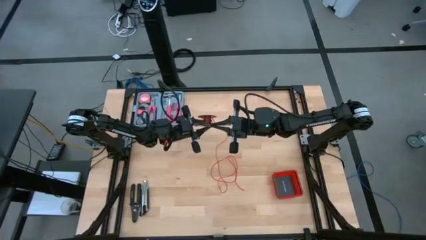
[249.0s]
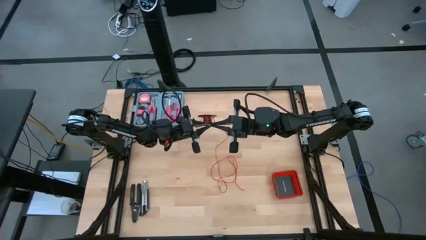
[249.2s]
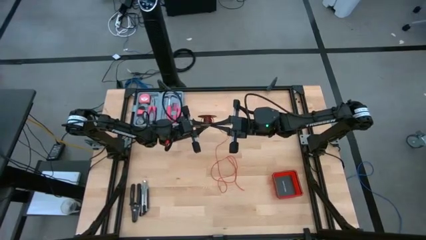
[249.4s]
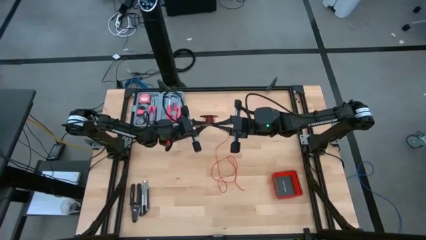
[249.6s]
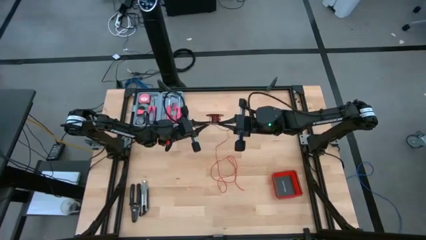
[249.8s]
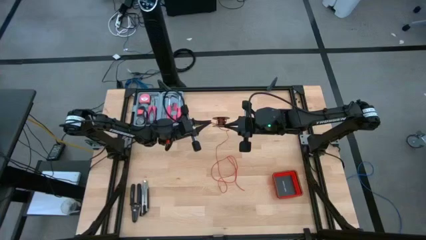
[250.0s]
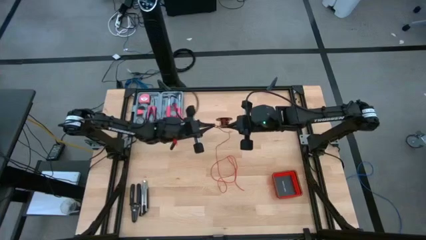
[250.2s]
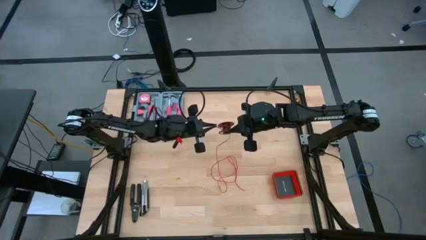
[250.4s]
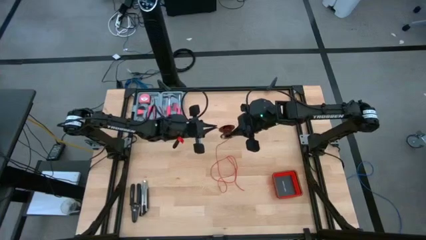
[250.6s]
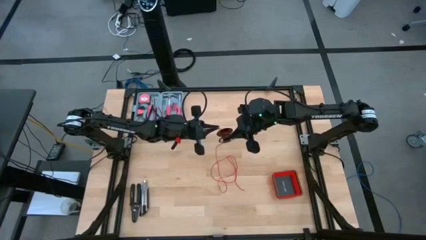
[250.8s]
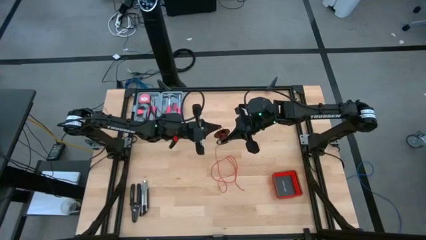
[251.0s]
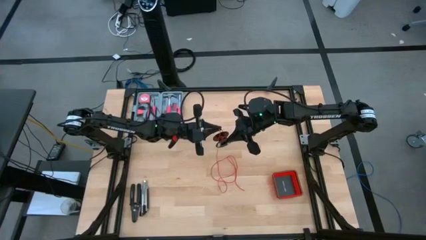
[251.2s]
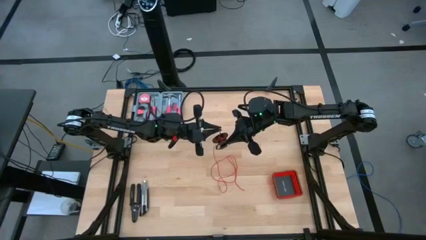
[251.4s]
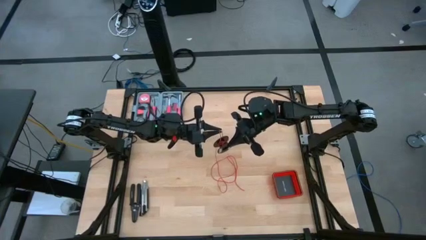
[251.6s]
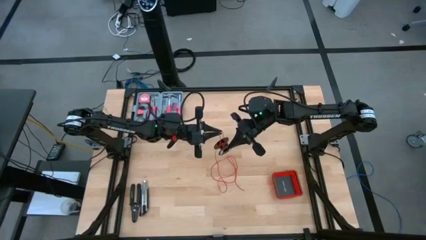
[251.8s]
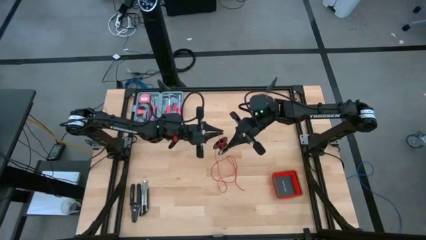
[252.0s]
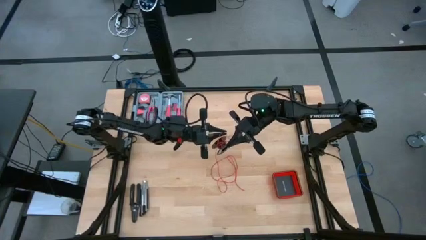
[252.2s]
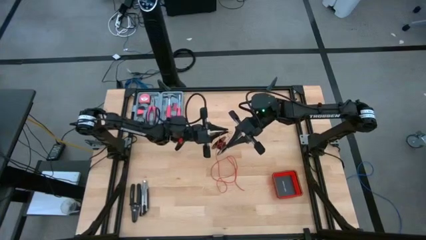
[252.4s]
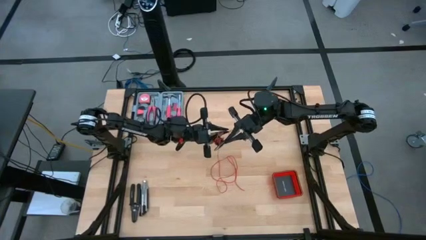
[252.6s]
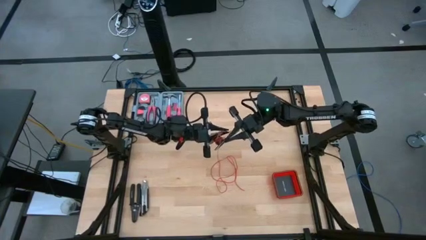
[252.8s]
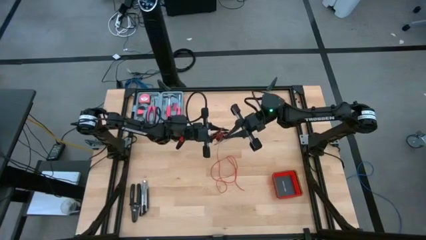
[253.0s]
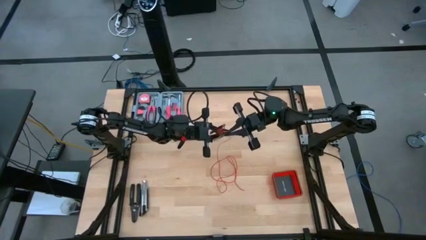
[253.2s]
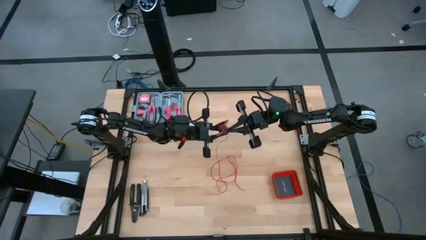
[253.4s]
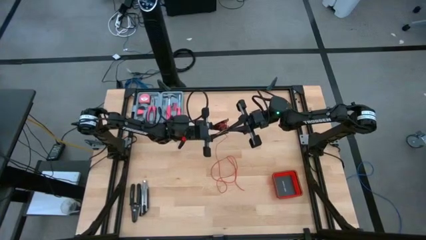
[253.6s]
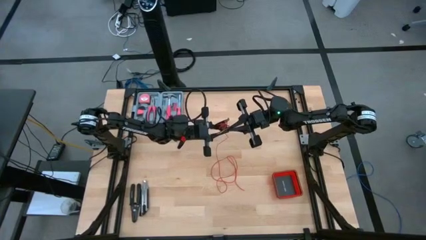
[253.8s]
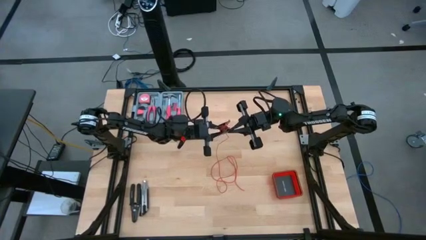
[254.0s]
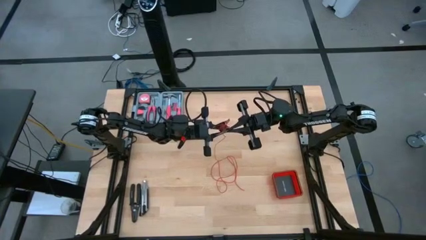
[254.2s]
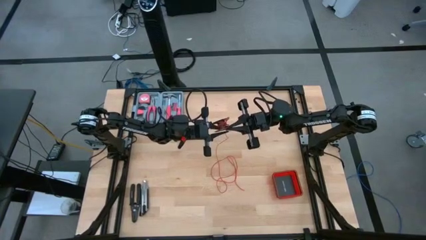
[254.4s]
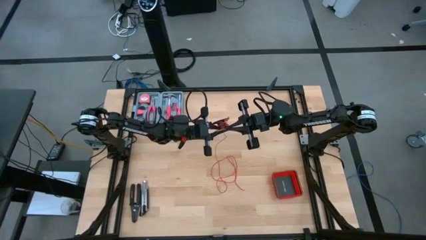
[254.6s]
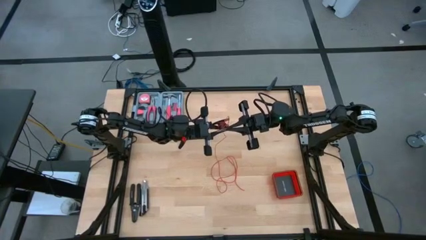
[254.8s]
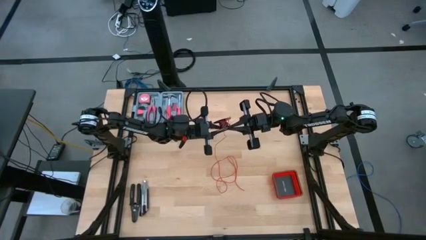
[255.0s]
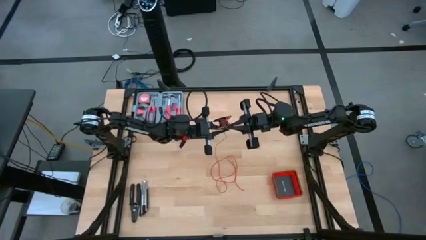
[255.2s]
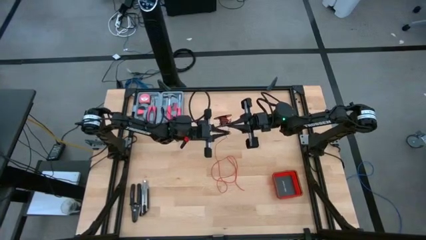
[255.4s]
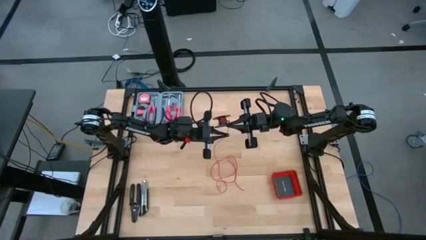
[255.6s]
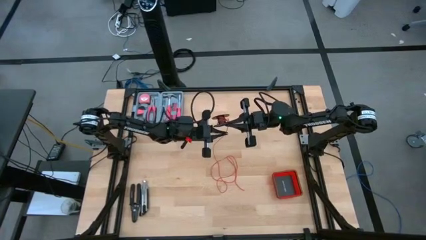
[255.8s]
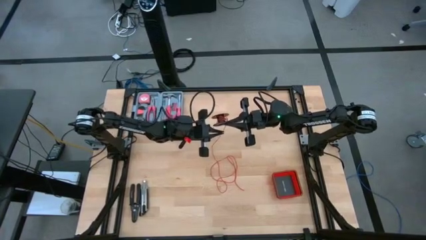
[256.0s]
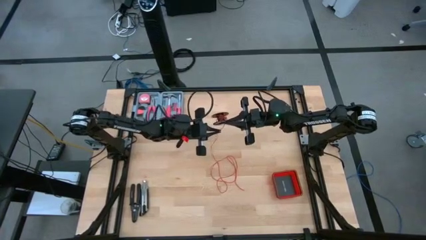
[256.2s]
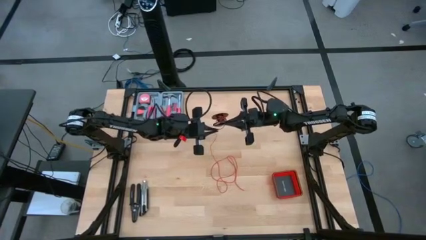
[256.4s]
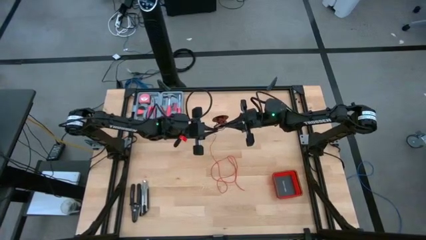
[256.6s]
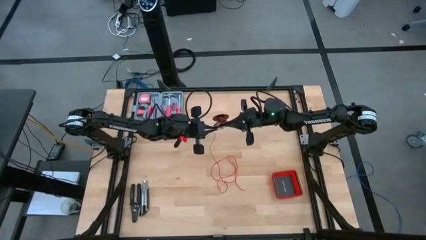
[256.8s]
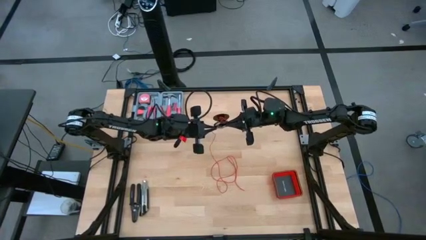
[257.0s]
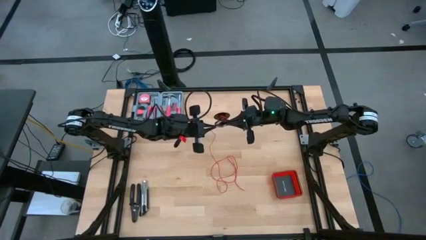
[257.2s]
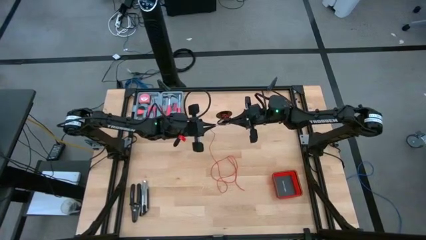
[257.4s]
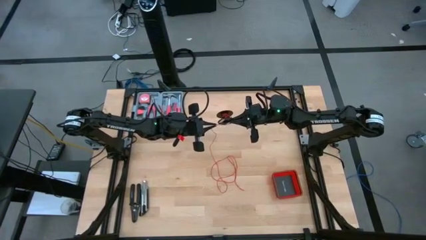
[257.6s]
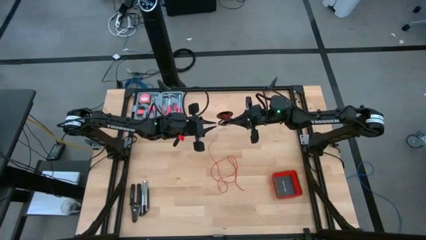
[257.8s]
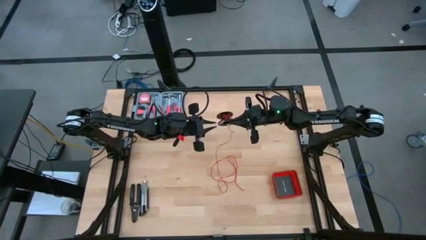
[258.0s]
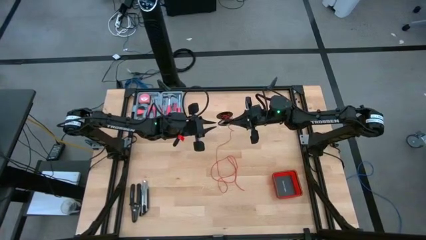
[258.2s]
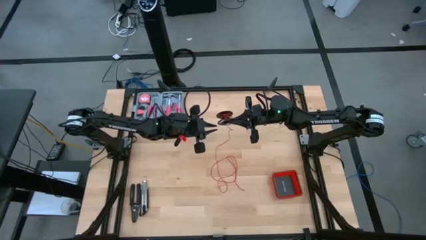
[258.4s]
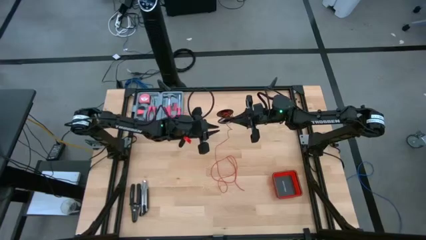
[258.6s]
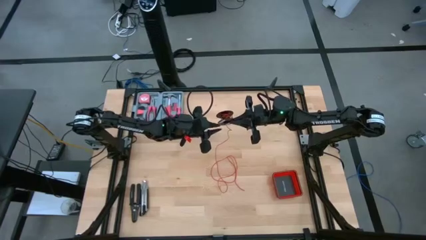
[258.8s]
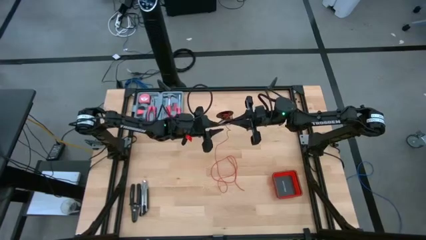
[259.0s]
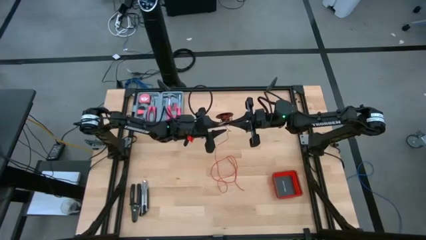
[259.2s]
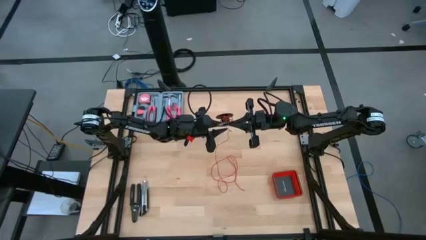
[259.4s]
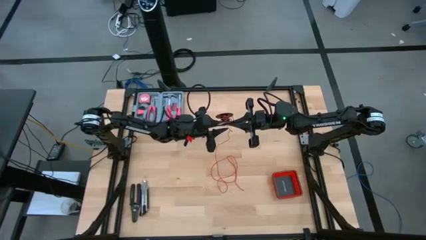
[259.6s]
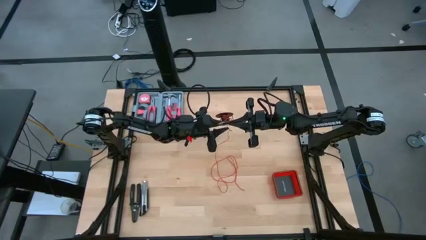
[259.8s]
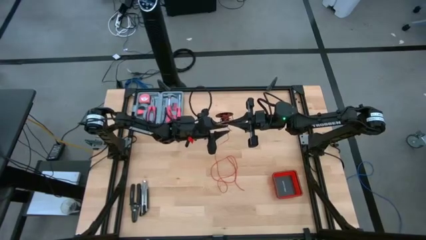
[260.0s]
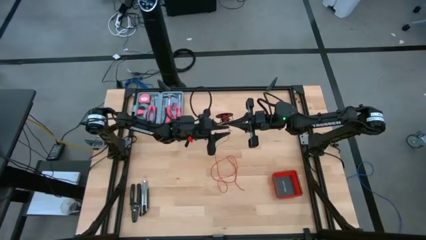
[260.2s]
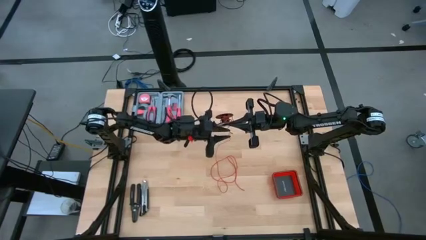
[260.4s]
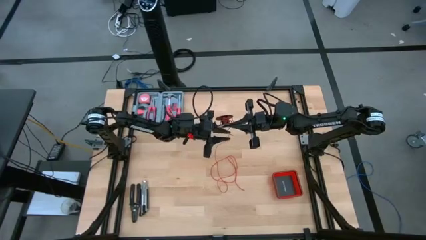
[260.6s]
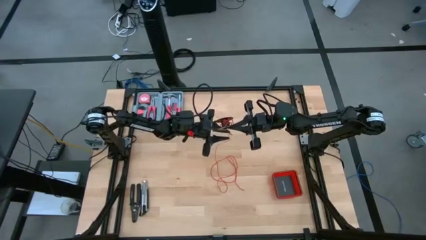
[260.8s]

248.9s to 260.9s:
Task: Coil cords
Coil the red wire onto the spool

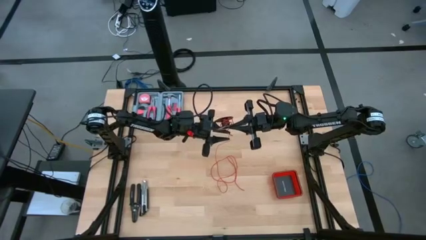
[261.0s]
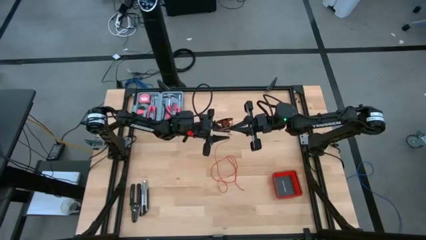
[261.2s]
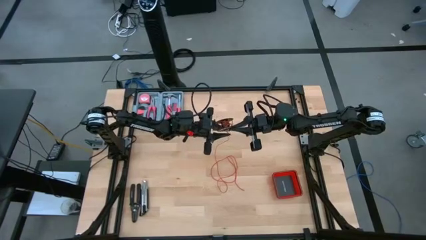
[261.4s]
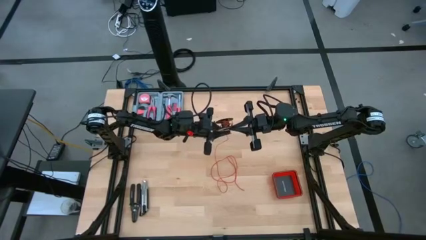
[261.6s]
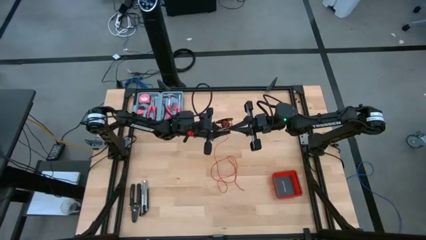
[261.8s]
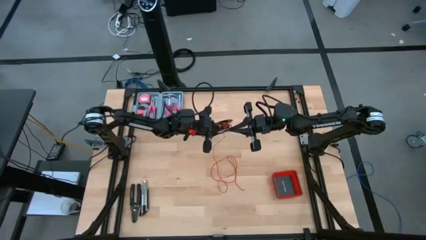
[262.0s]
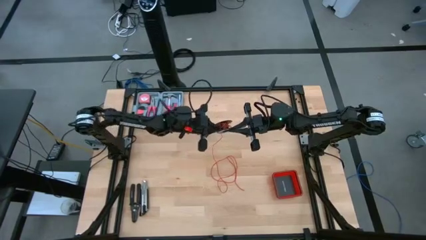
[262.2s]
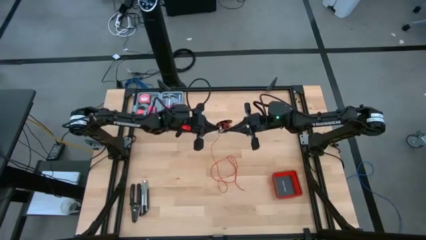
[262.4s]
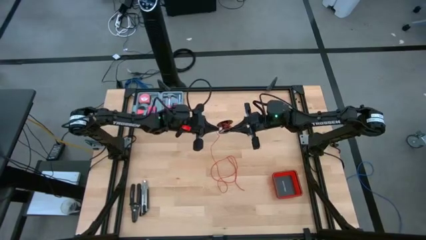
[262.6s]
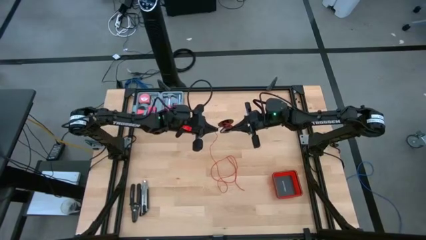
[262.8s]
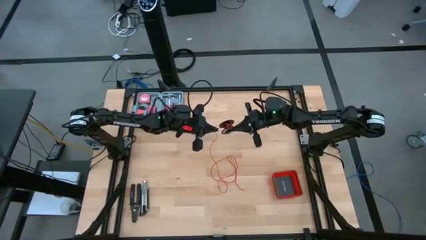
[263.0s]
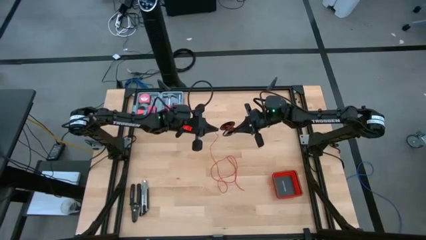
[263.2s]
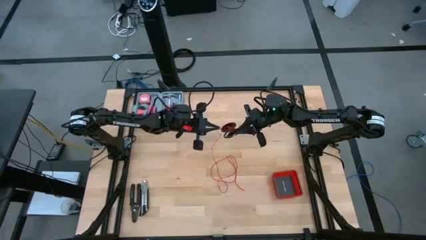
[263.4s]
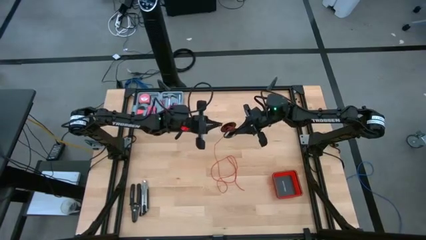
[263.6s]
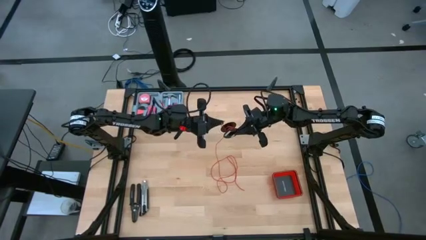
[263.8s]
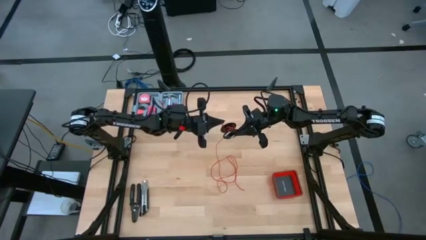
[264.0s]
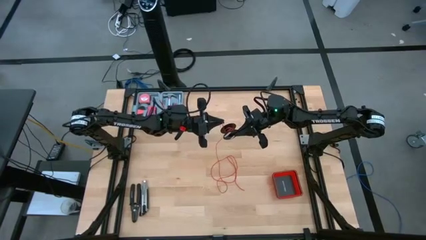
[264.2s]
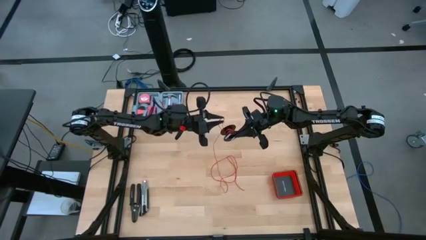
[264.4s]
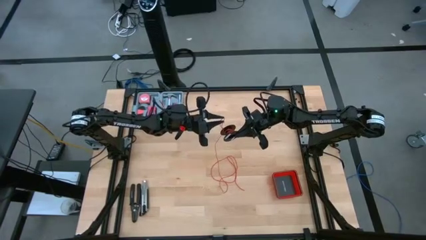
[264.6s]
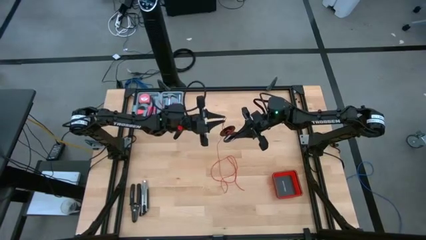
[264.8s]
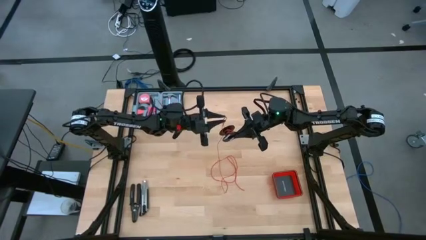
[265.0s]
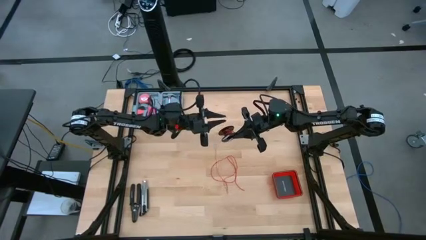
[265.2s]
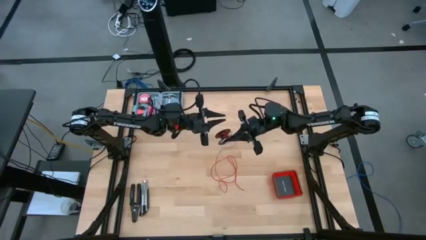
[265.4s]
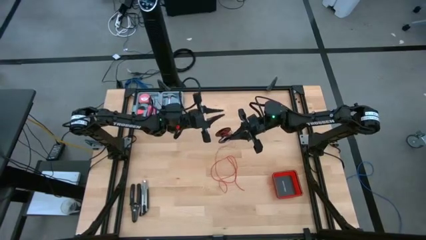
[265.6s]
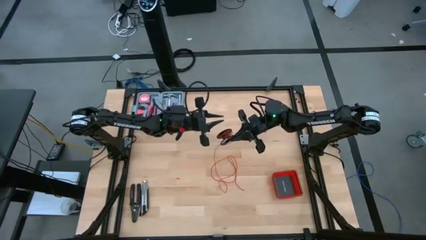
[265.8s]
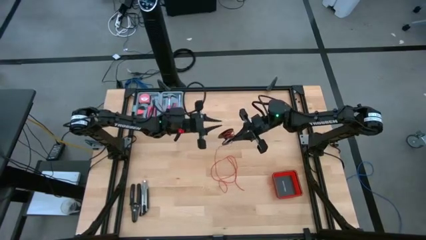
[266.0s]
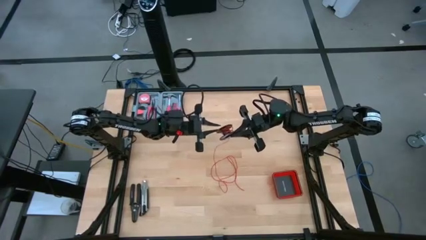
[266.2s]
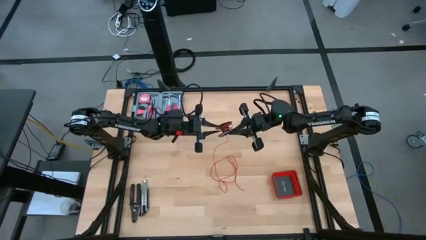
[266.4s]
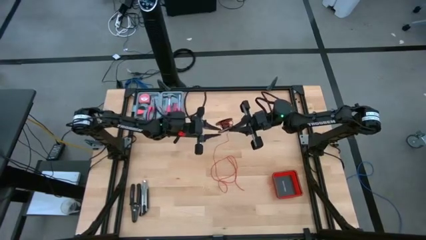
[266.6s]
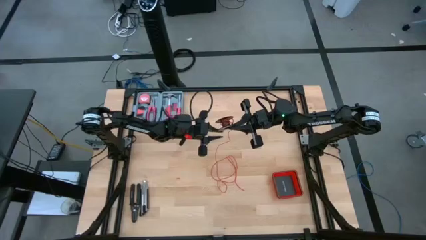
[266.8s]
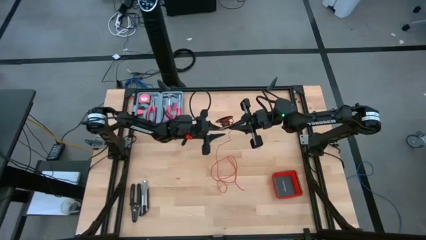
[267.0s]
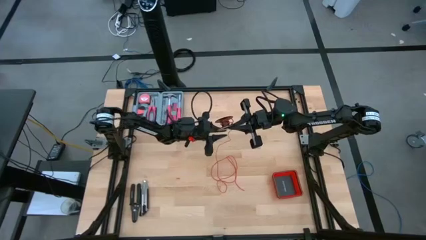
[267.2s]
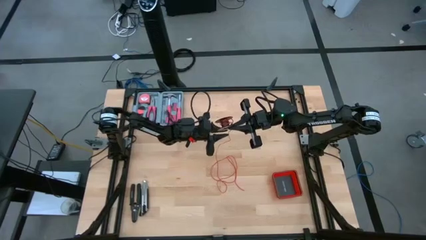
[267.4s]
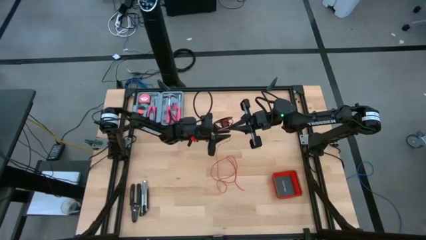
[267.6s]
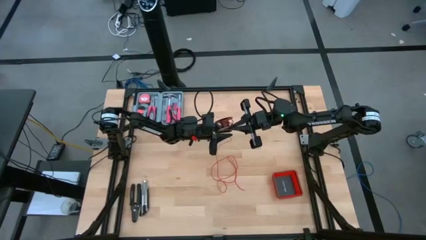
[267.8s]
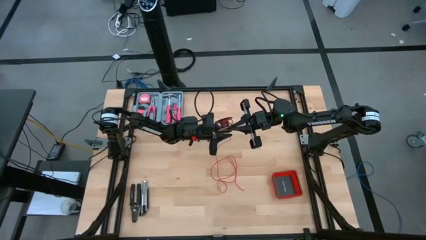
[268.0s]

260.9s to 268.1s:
Coil the red wire onto the spool
